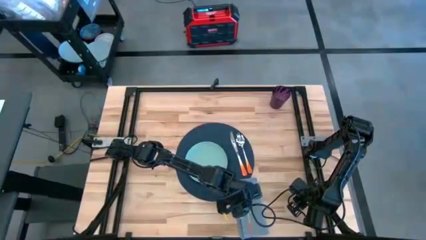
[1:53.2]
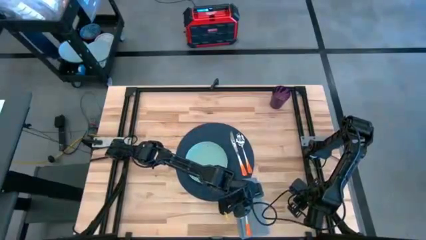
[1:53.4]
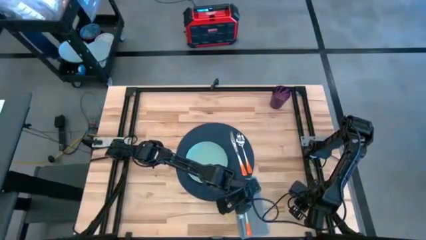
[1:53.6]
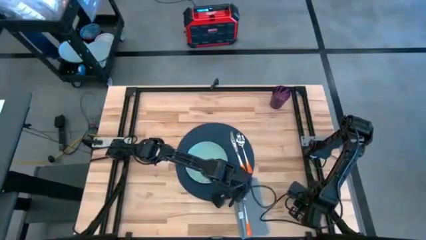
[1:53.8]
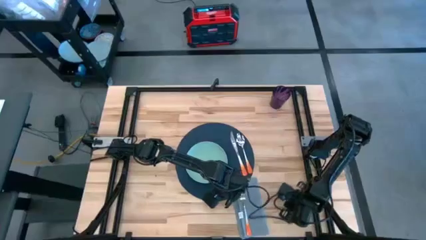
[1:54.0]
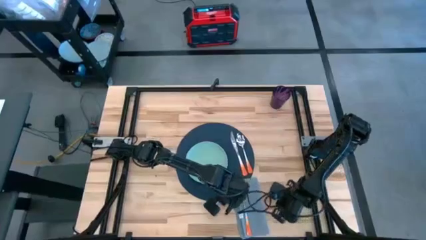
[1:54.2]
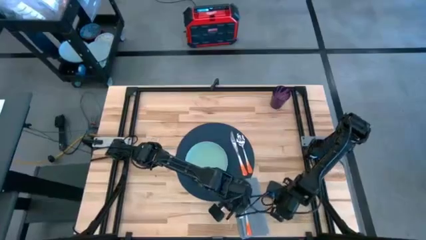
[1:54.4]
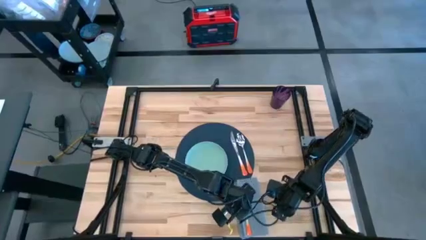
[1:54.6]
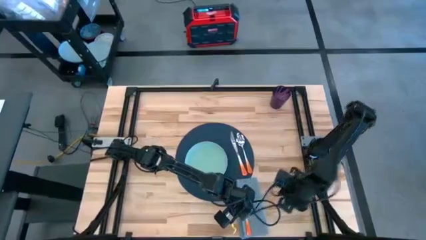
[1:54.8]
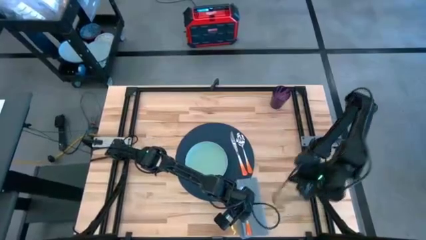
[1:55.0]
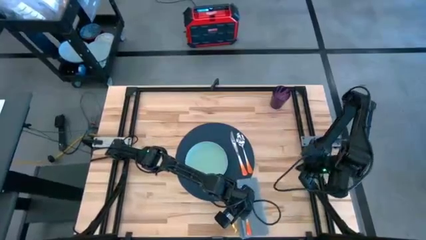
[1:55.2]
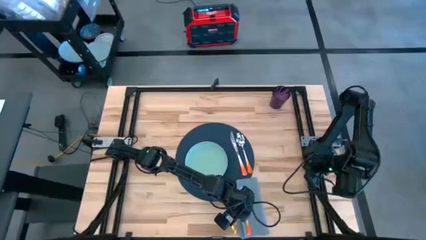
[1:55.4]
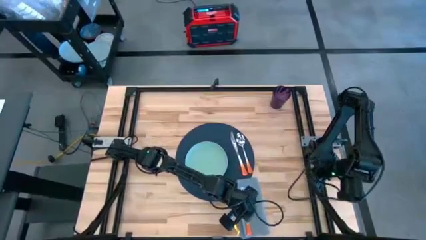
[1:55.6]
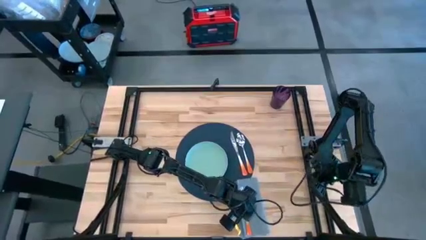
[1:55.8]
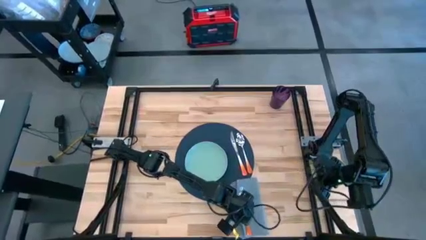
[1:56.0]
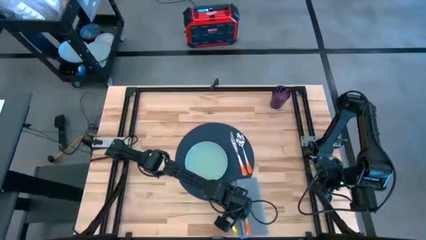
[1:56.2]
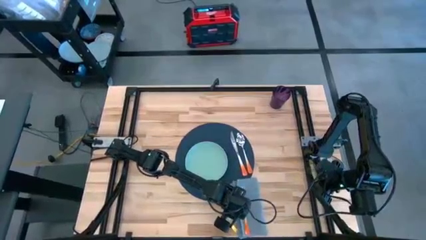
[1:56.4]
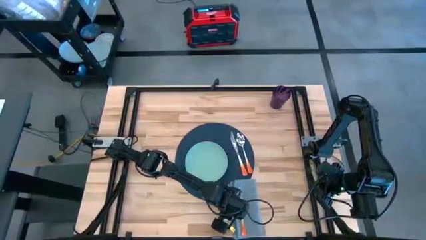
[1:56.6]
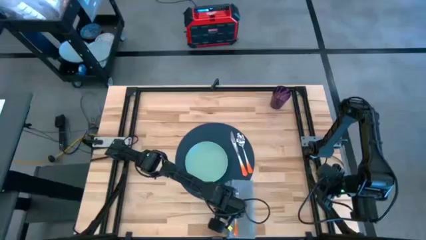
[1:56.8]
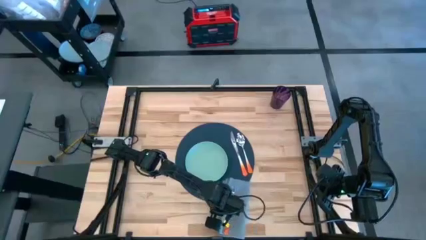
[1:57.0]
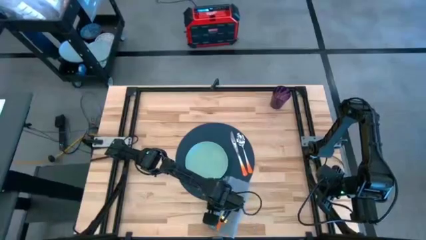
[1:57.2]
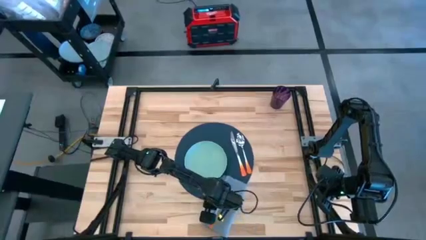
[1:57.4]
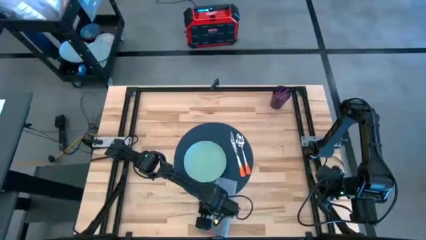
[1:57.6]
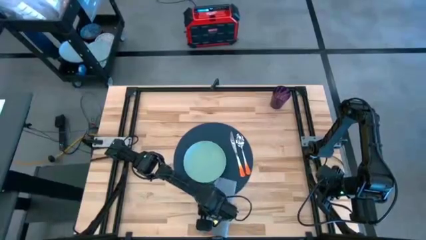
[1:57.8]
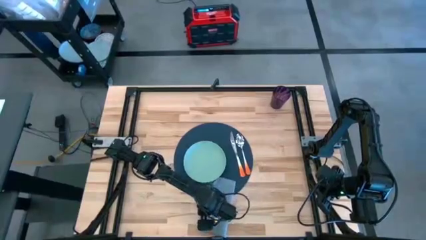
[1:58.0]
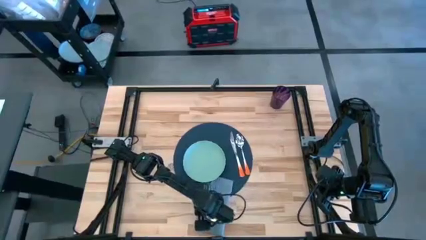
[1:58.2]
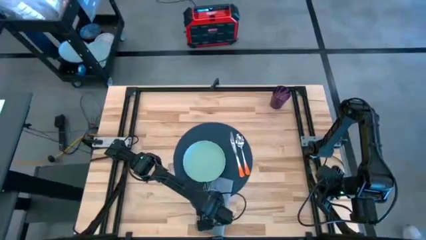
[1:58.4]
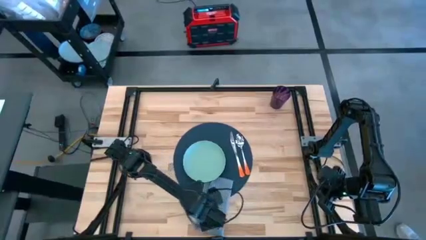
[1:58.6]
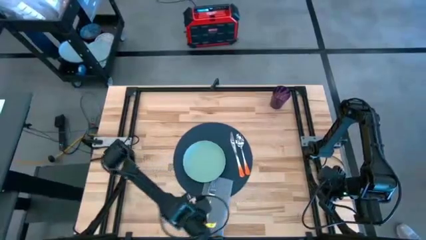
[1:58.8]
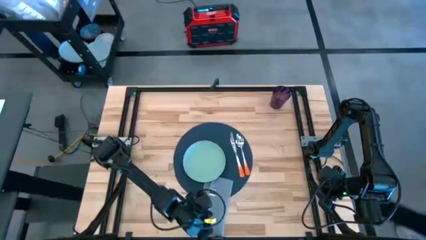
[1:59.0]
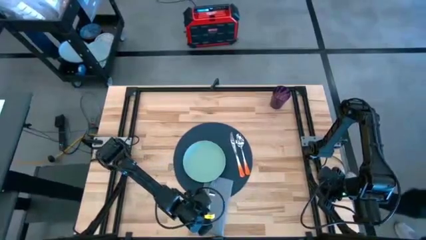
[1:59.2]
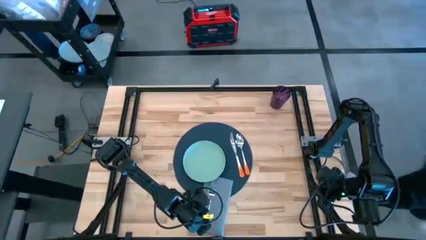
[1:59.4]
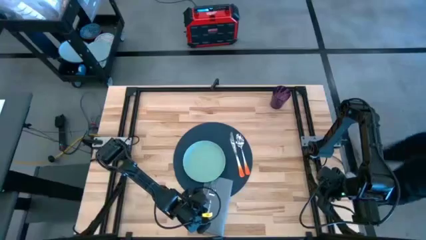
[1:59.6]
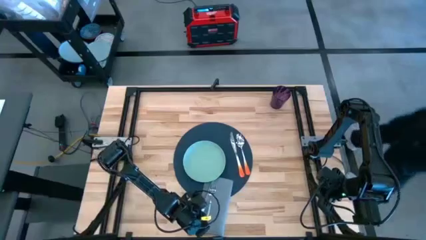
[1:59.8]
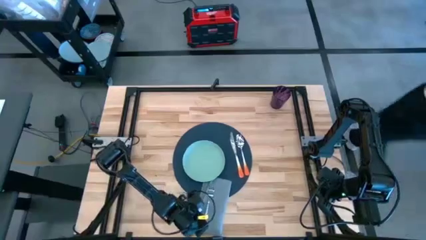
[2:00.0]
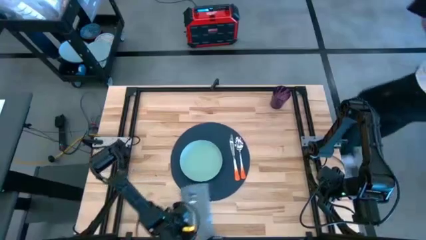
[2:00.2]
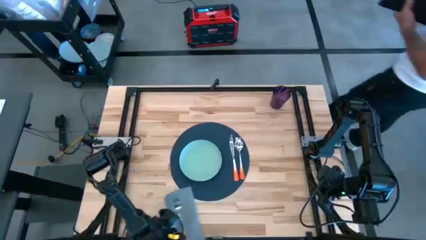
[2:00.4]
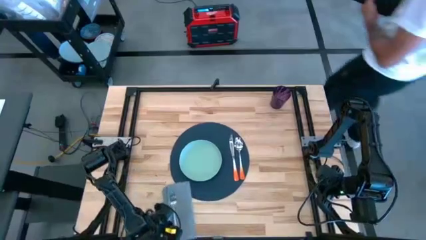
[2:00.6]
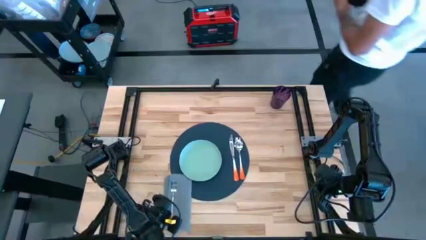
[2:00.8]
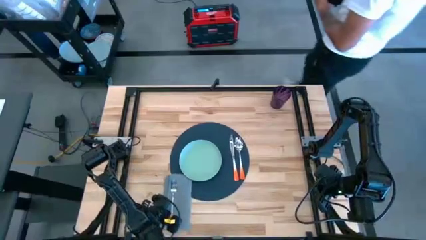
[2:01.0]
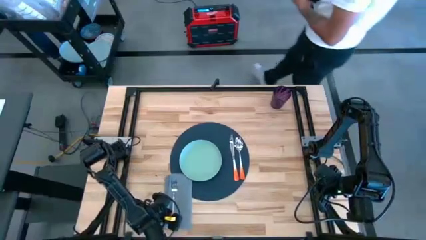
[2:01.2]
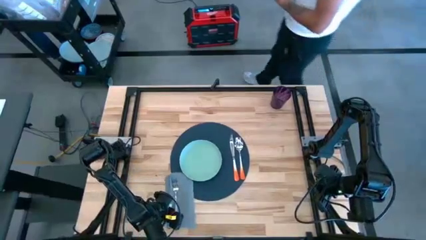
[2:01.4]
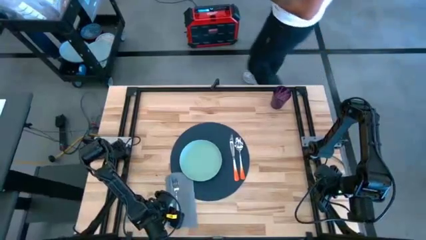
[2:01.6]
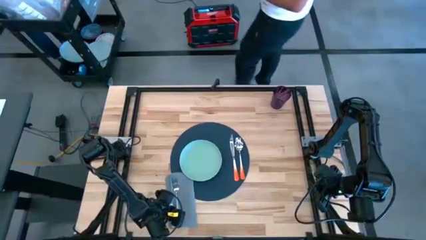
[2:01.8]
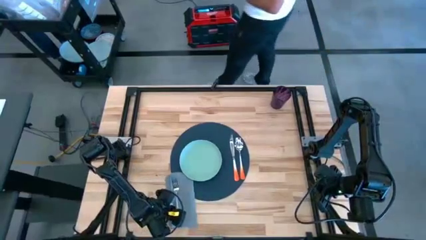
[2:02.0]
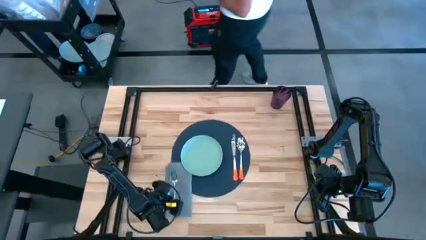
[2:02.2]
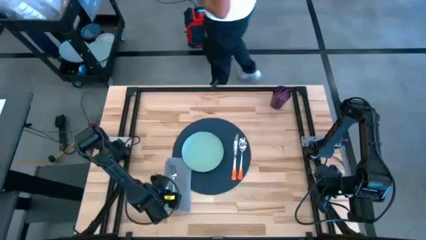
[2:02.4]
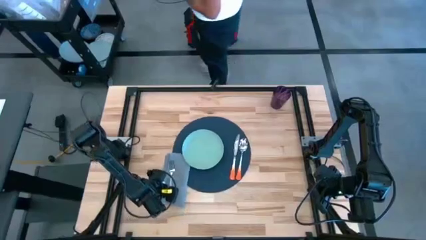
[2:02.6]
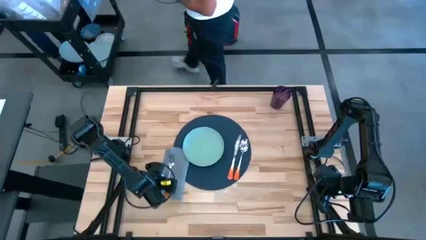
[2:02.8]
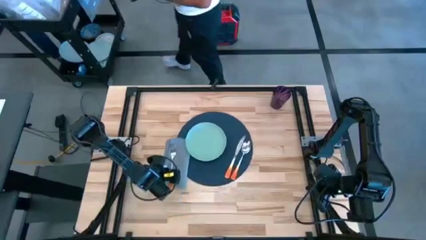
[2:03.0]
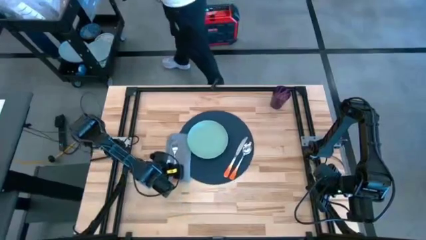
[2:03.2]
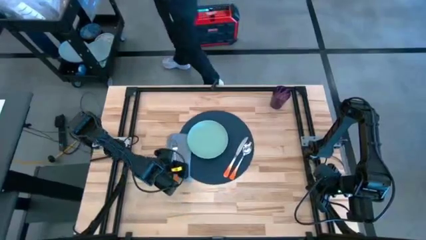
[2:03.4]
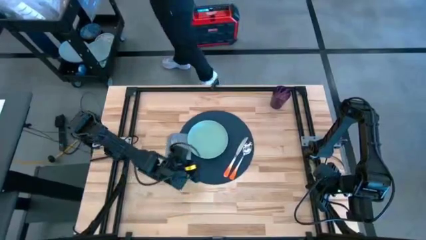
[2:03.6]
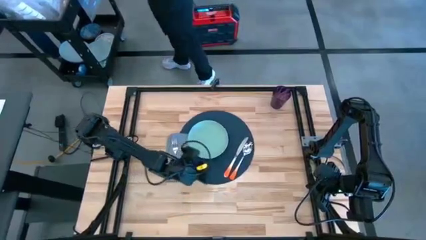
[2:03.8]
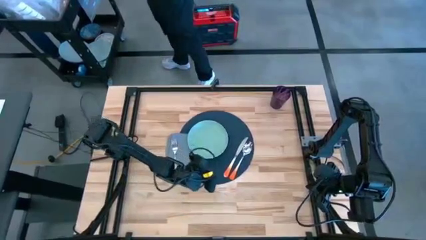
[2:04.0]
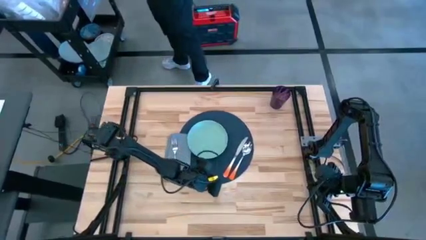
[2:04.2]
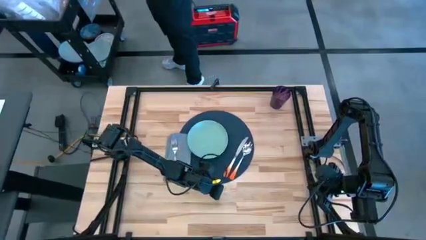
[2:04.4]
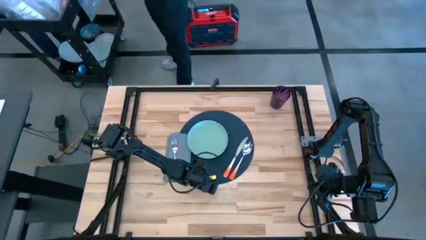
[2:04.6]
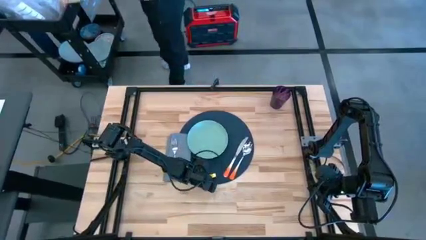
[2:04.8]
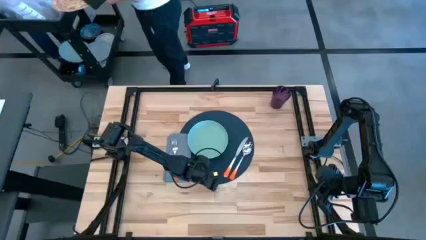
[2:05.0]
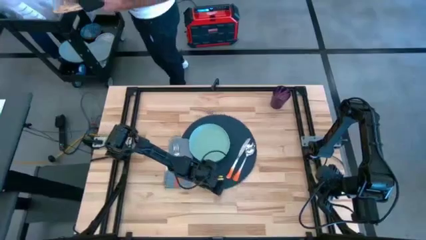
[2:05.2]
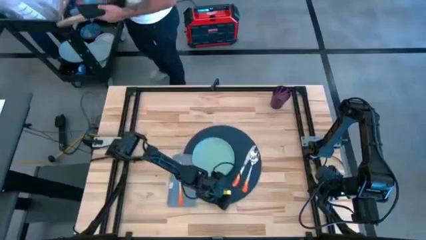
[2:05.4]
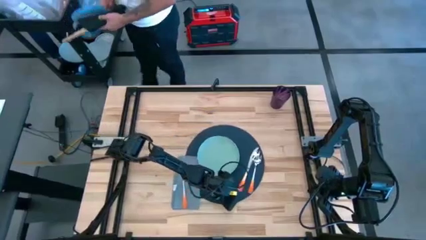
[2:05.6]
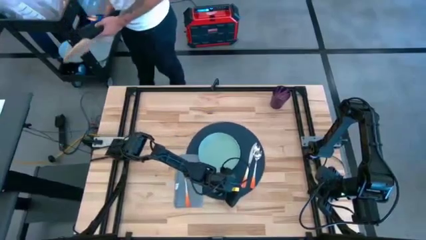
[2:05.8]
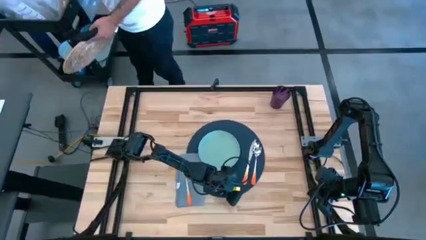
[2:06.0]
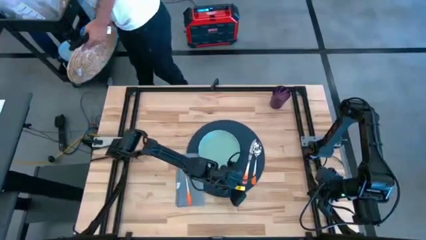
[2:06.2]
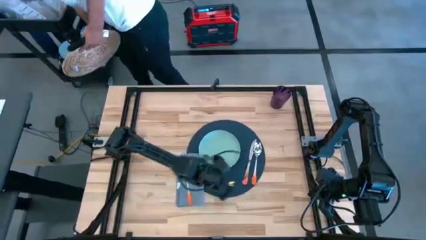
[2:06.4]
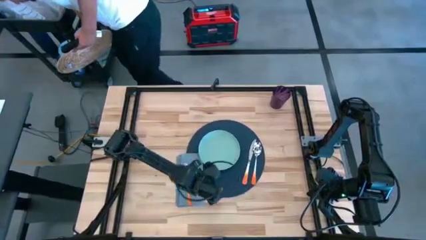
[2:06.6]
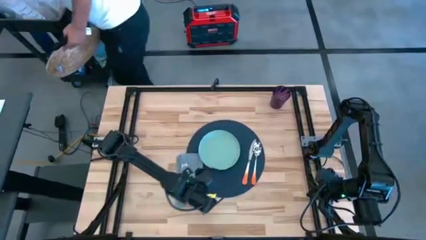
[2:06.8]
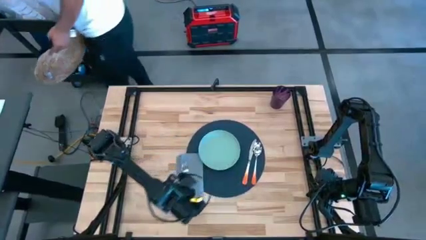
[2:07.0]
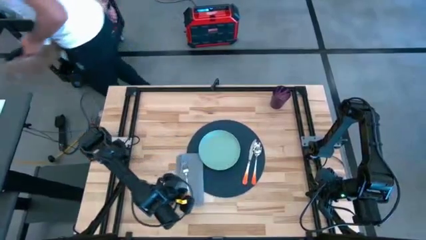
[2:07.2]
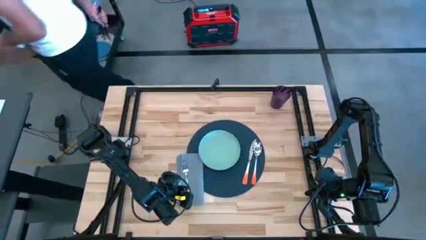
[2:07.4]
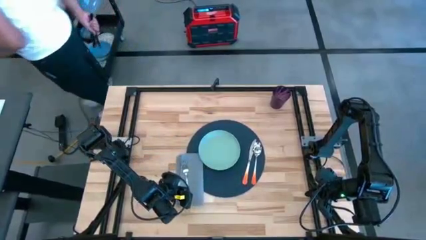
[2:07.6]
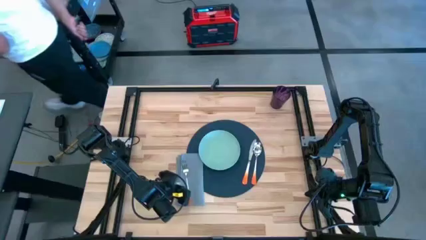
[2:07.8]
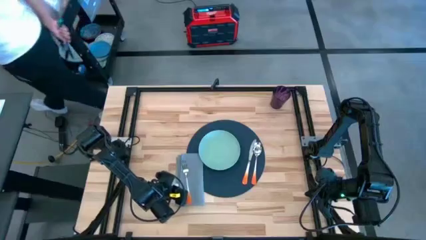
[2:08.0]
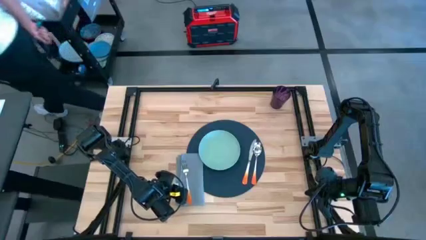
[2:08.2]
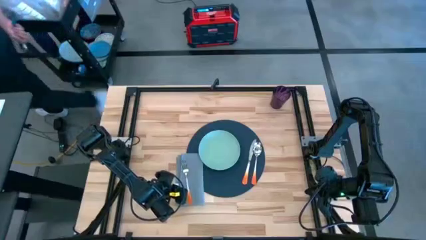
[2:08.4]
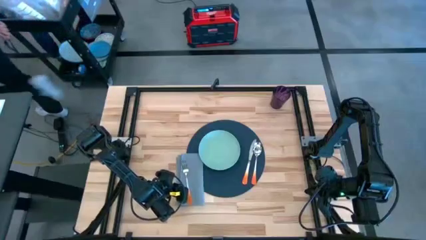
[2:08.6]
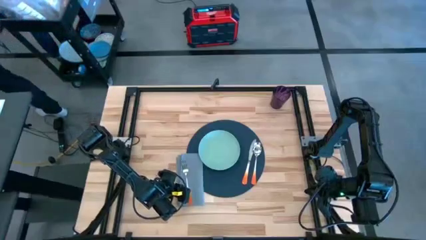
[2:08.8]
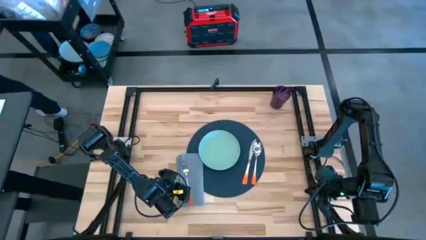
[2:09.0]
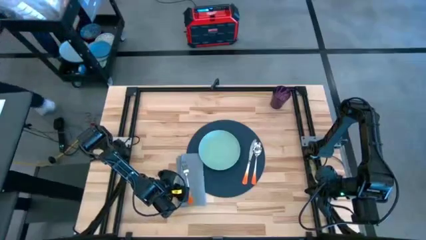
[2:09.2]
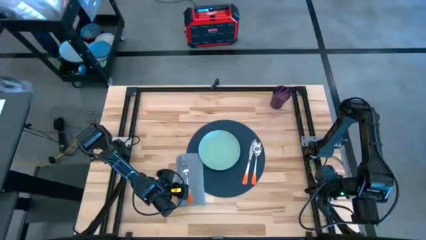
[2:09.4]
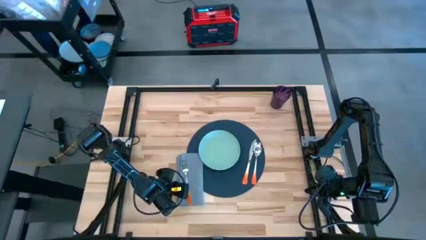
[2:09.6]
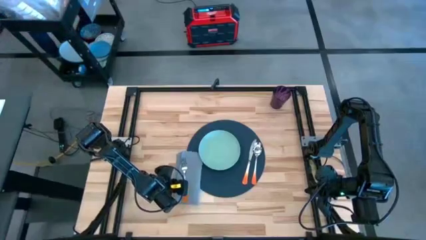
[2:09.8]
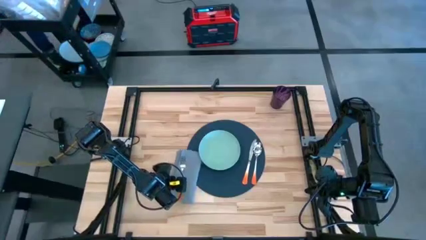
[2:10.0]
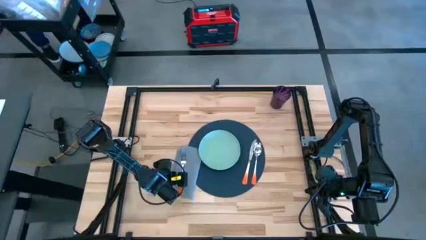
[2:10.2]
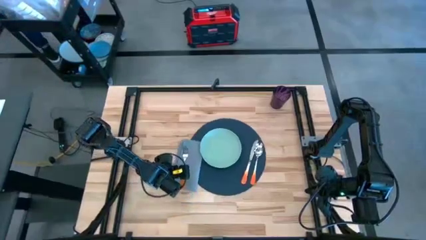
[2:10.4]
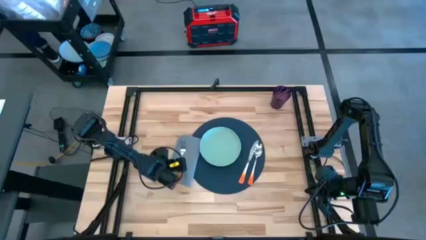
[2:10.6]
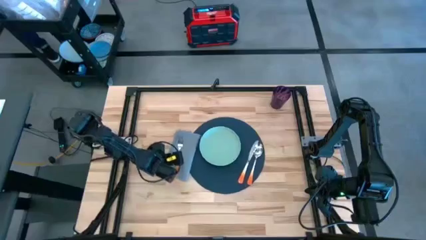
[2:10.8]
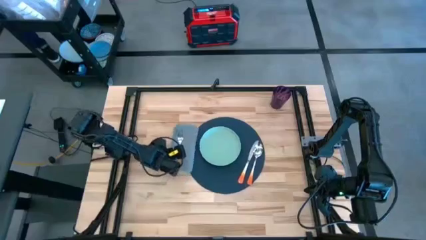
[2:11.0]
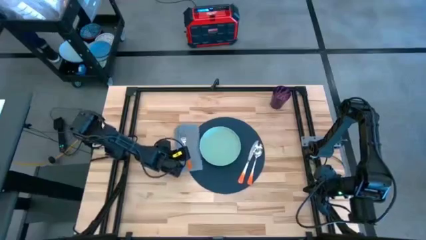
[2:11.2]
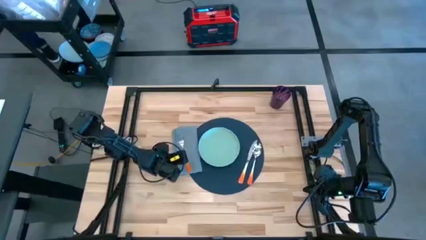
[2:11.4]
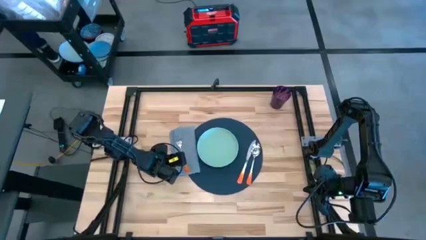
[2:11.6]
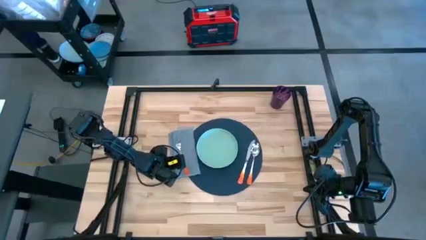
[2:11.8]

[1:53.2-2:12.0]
Task: Set table place
Move the gray table napkin to the middle left of the blue placemat
